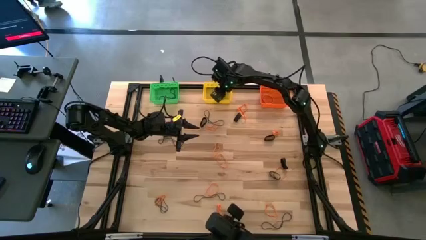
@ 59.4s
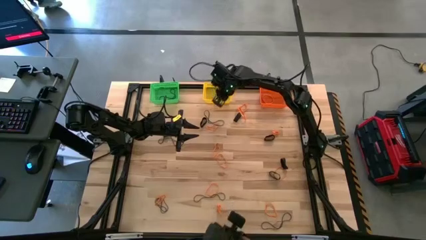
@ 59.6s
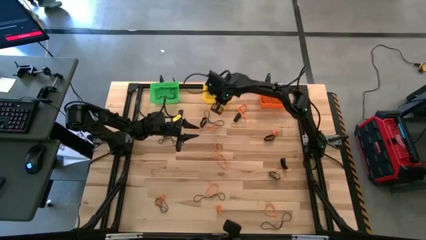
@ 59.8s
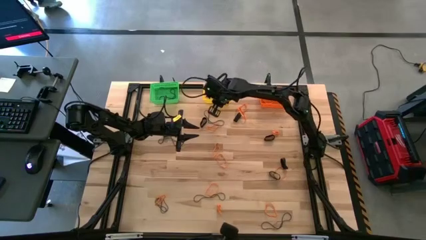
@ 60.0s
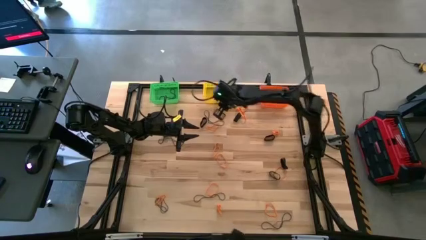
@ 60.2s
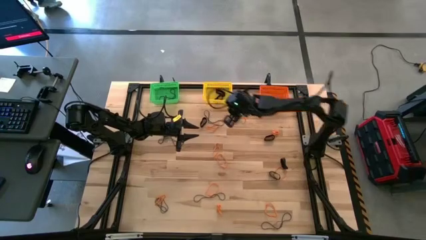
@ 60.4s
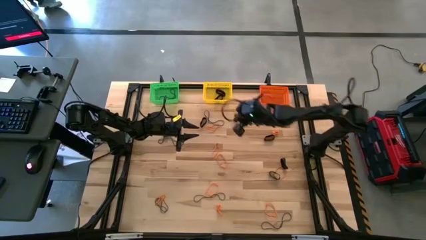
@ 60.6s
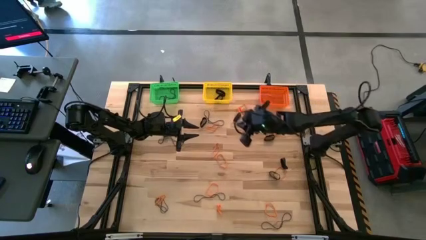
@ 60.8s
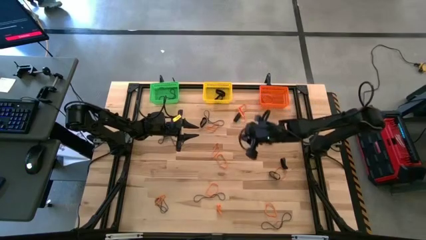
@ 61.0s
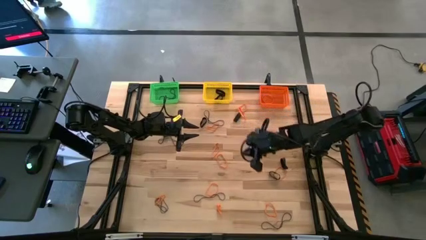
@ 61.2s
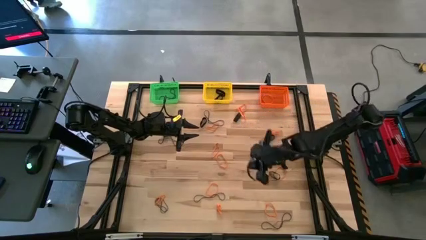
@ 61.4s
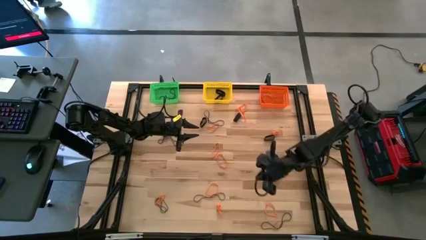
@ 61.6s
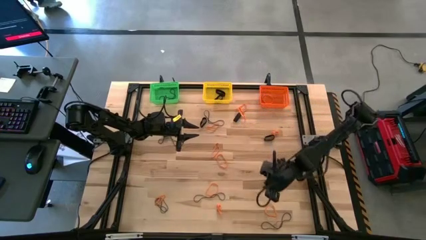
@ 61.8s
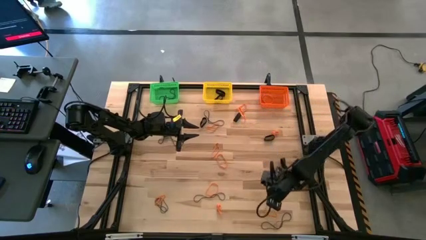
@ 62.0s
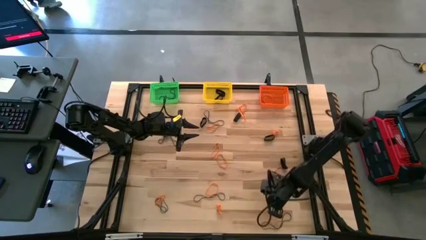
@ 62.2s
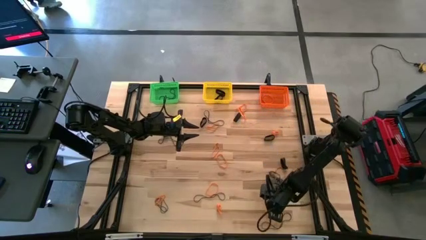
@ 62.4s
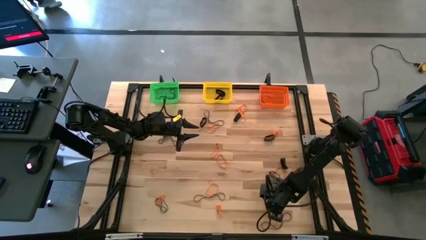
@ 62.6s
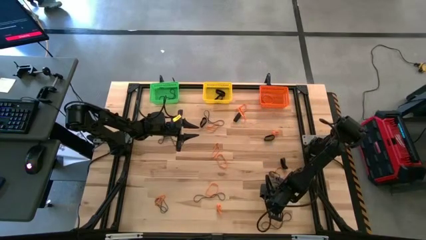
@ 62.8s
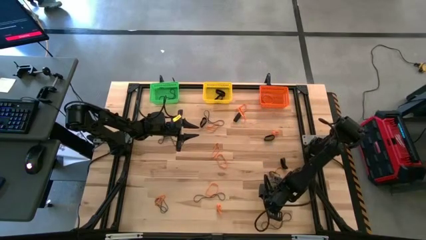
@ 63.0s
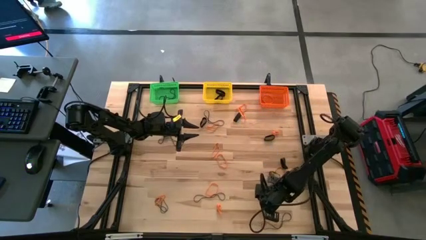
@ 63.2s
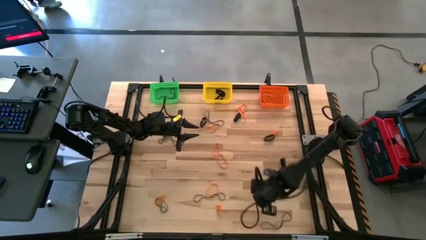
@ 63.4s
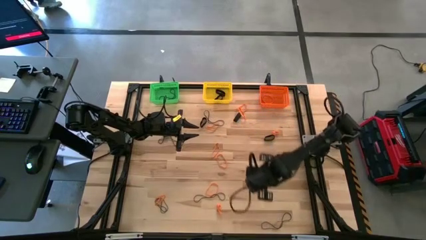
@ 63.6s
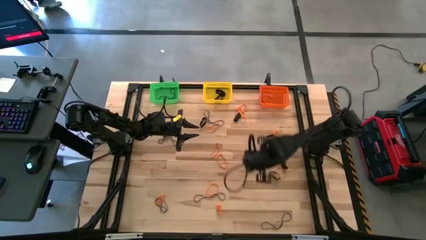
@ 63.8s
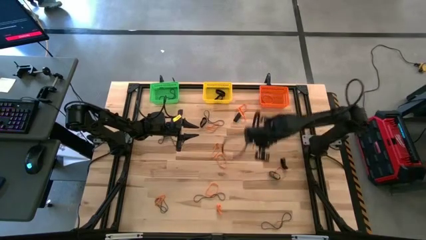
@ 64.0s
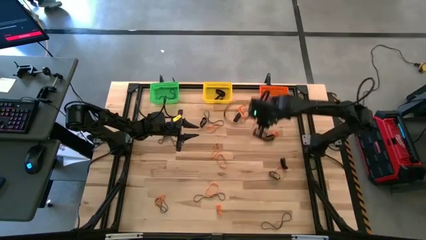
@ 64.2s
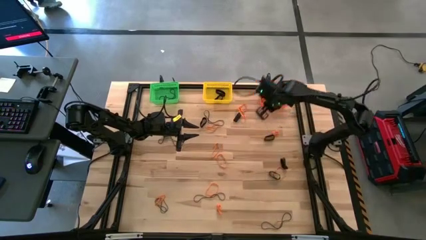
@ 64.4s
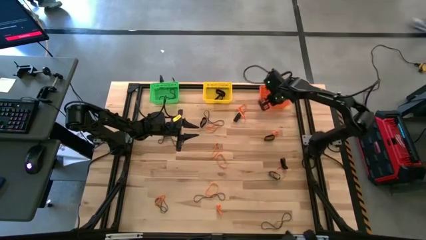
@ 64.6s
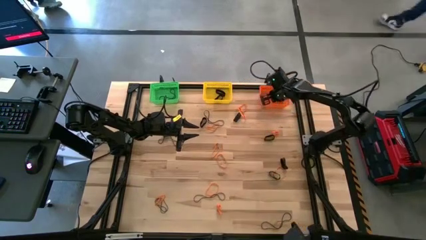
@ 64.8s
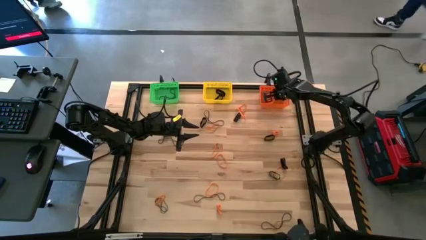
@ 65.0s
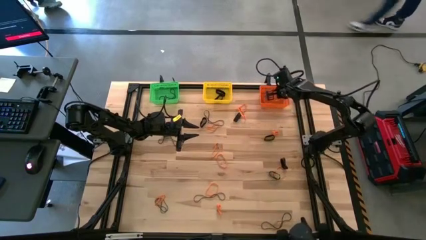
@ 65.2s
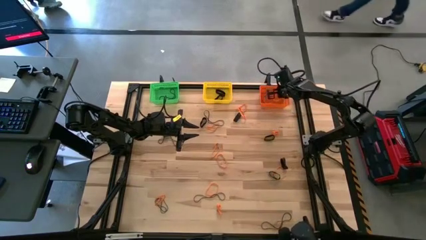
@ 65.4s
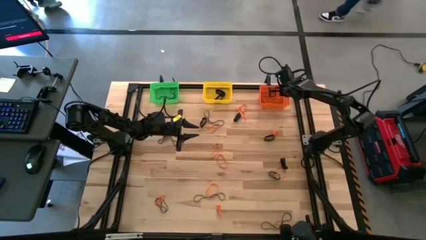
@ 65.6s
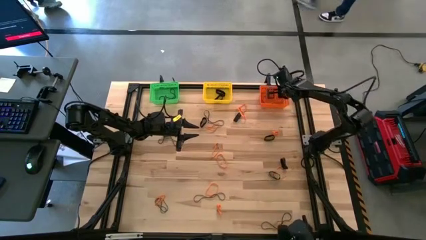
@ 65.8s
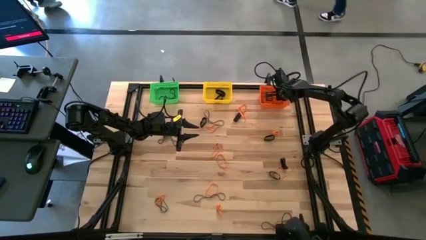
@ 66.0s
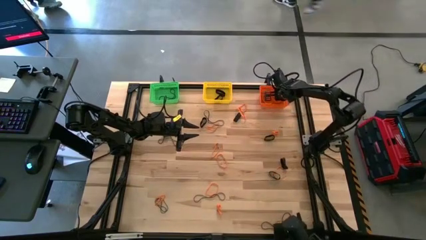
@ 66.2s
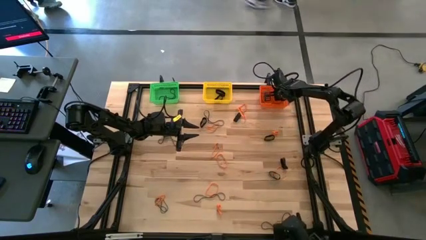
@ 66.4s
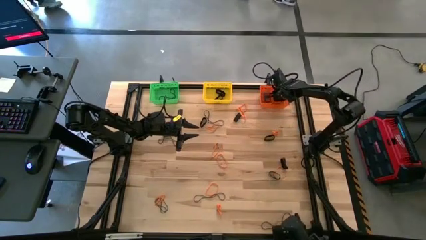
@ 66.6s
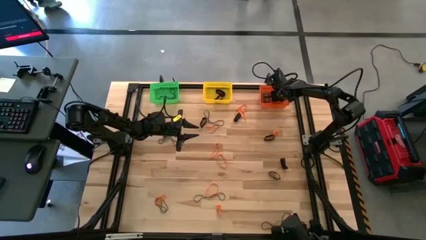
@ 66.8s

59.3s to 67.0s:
Task: Sort rubber bands into baskets
Put the orange rubber band into the orange bin

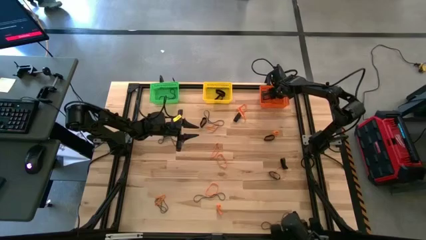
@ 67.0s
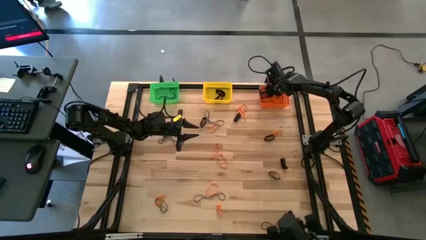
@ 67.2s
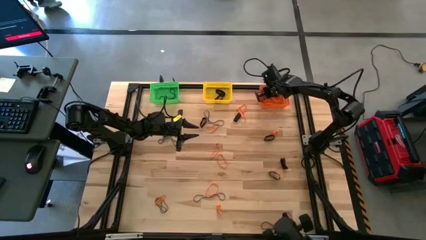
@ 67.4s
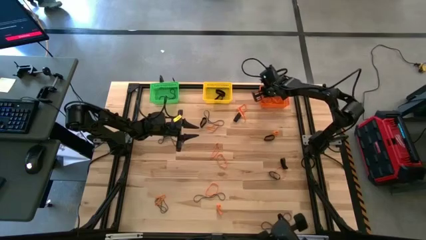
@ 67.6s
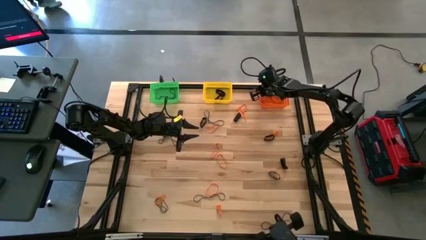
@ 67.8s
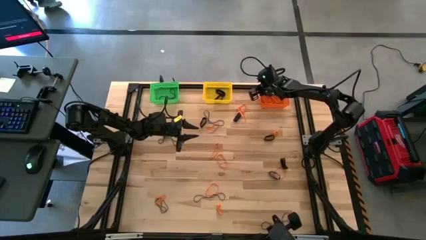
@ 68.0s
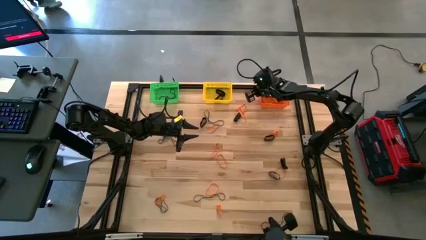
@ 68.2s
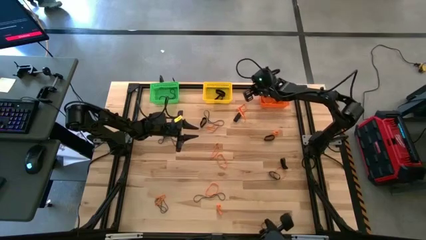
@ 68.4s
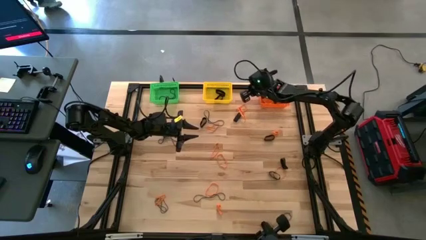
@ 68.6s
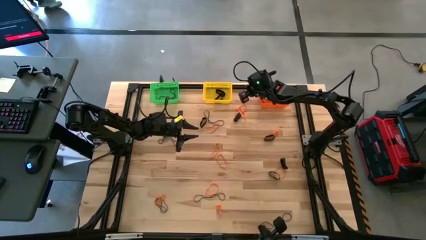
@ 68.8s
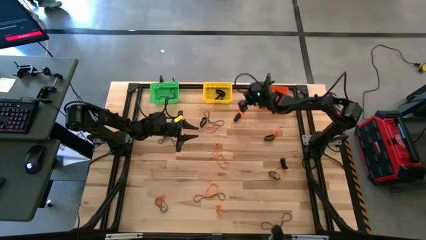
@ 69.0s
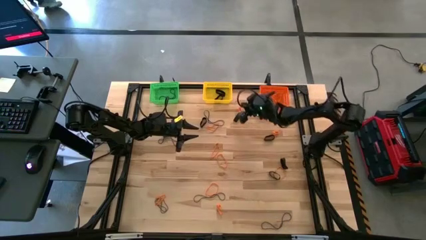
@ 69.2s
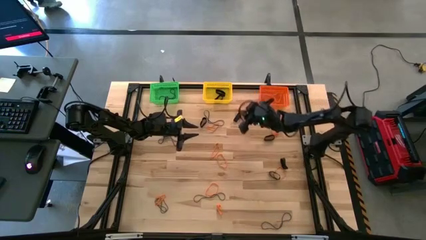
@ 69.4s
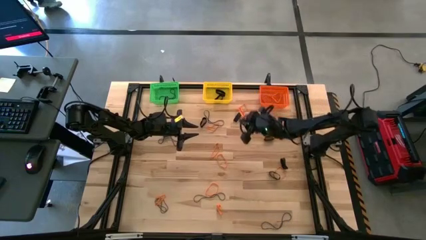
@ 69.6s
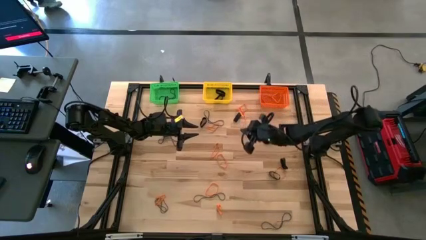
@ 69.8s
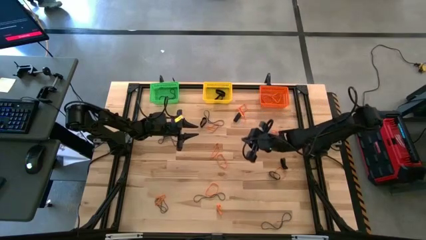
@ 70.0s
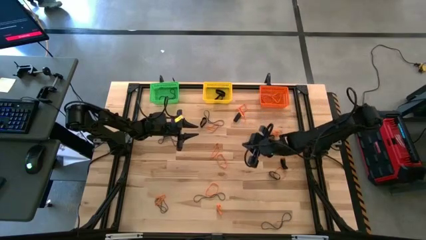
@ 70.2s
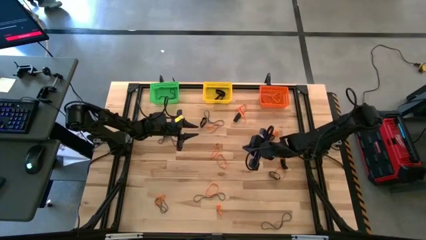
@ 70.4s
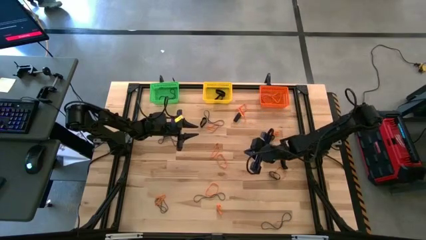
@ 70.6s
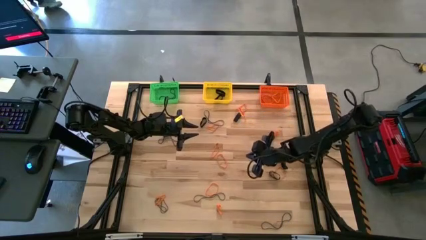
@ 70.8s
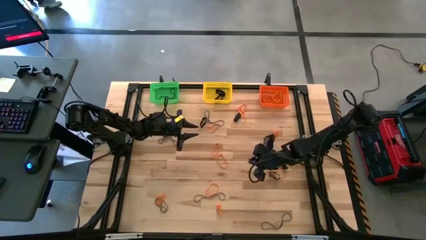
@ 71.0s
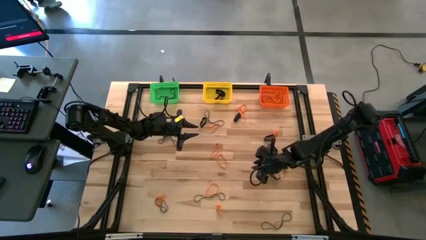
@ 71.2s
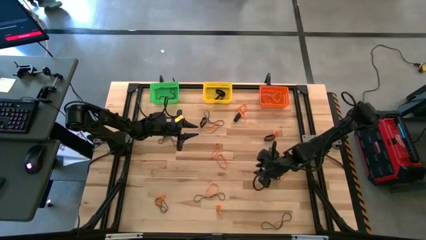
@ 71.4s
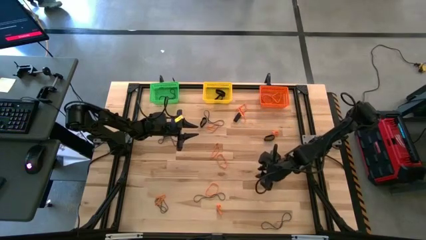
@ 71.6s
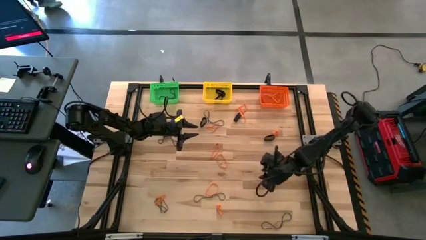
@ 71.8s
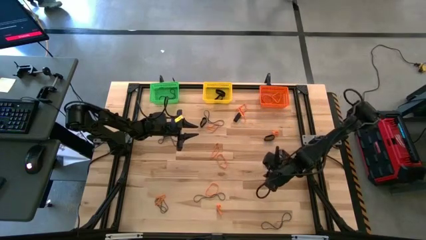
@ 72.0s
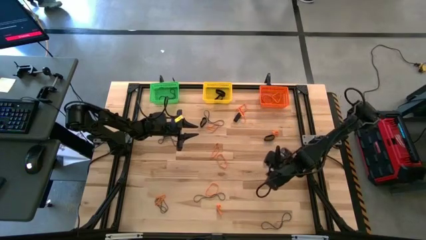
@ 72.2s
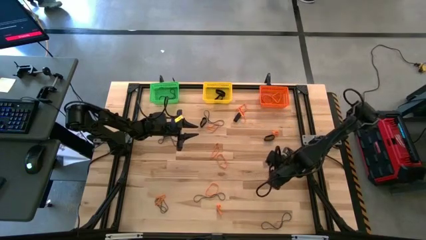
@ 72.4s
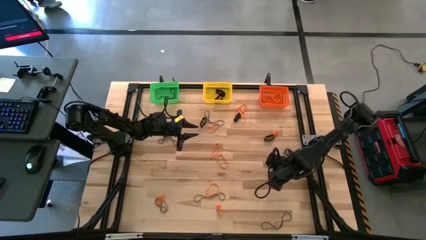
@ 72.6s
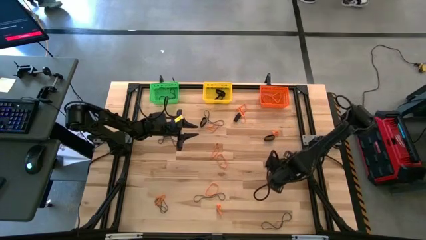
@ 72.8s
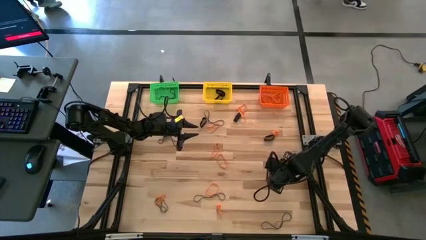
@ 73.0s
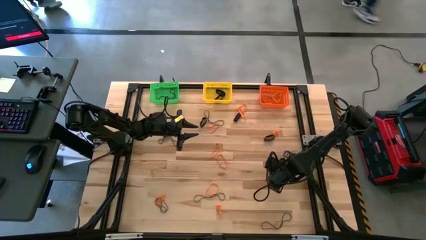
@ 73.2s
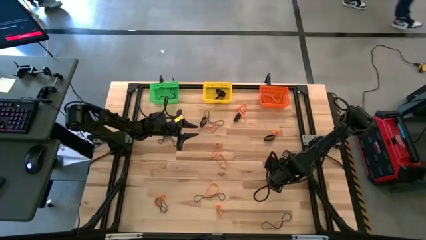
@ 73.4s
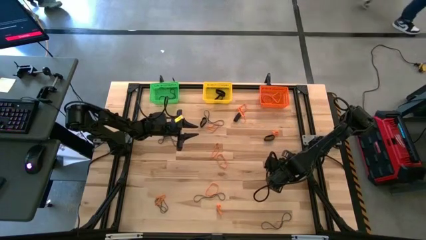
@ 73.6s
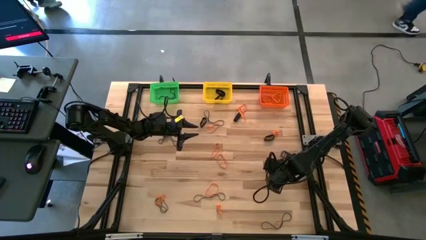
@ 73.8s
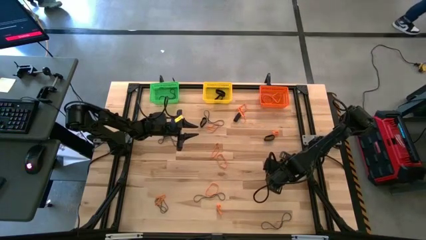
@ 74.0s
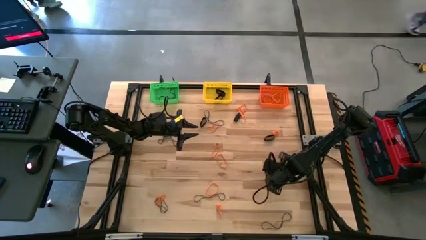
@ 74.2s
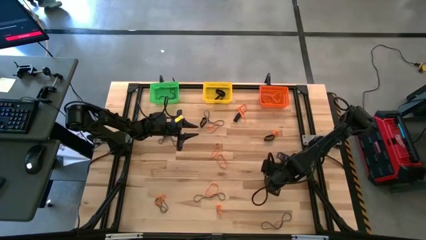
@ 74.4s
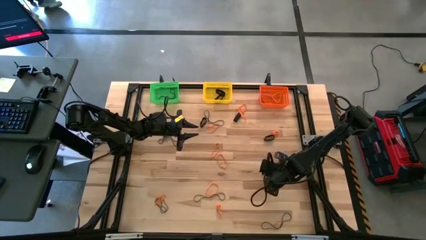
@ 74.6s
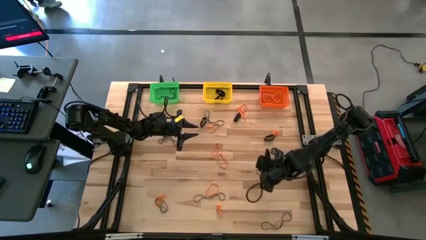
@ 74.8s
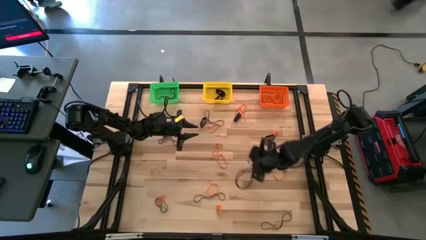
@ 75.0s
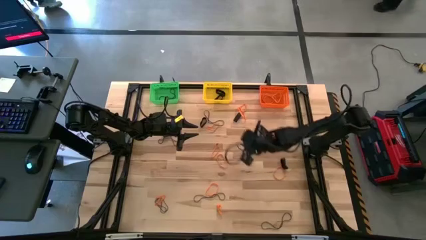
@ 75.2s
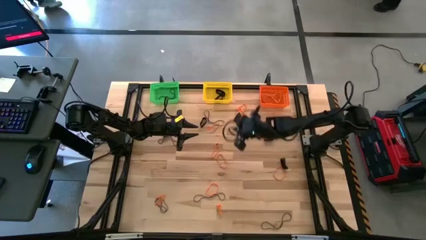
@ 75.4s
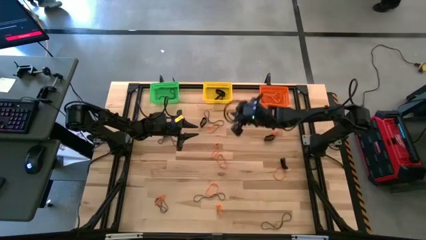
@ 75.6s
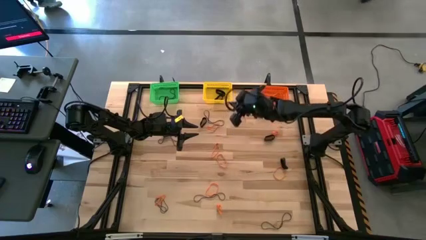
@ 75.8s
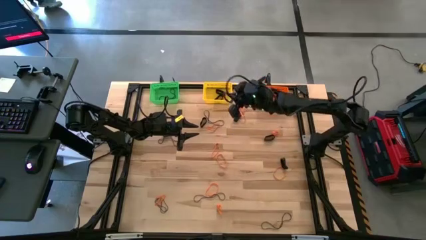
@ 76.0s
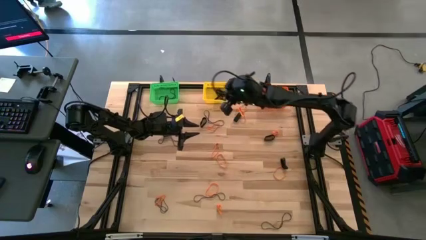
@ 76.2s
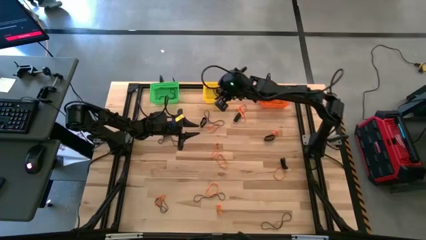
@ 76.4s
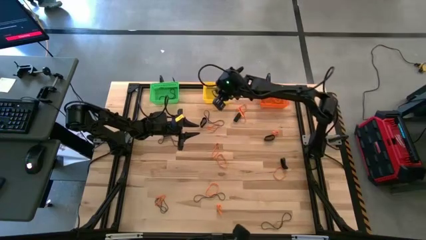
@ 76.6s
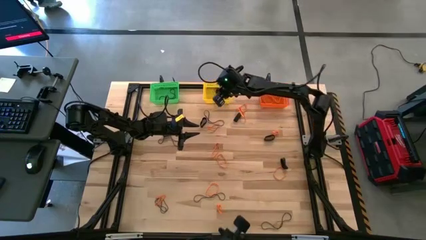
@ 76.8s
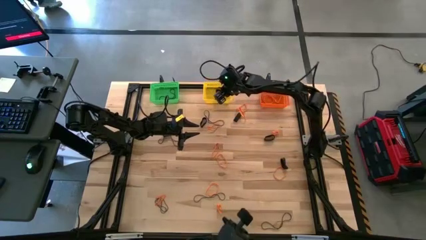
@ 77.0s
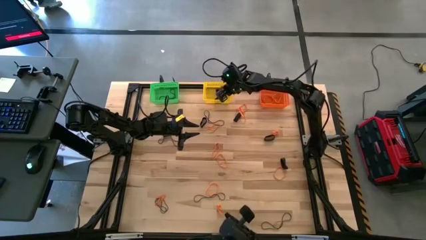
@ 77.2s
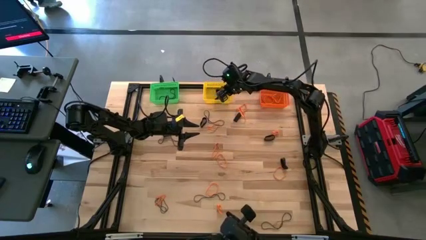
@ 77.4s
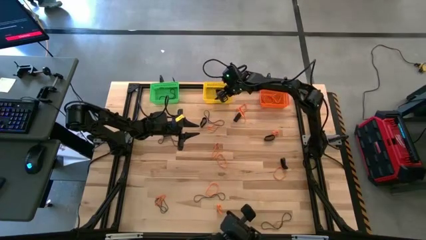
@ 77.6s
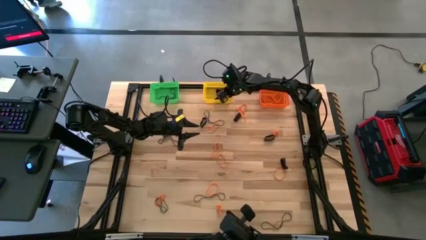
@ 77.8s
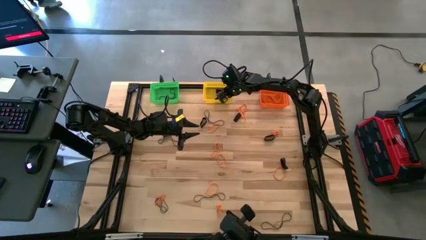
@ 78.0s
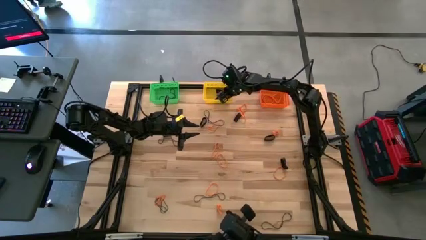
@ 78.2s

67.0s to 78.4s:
Put the black rubber band into the yellow bin
